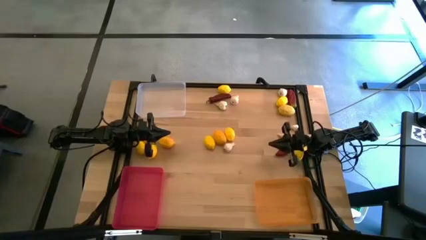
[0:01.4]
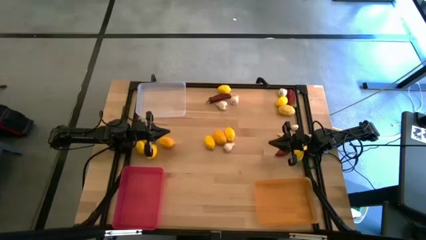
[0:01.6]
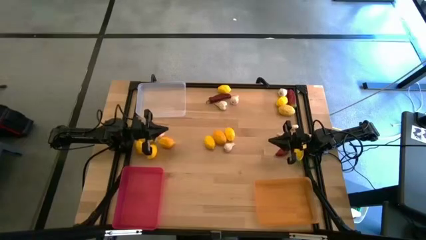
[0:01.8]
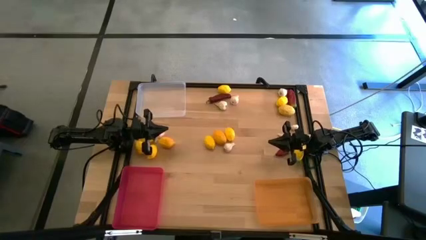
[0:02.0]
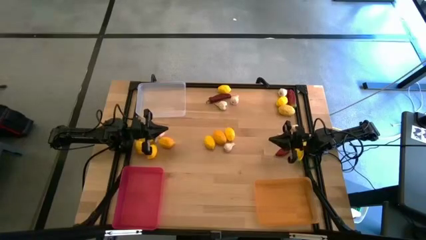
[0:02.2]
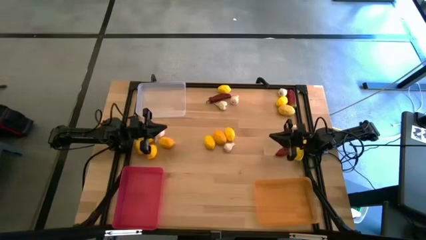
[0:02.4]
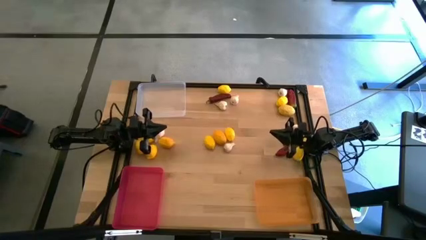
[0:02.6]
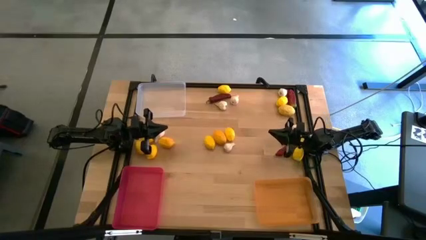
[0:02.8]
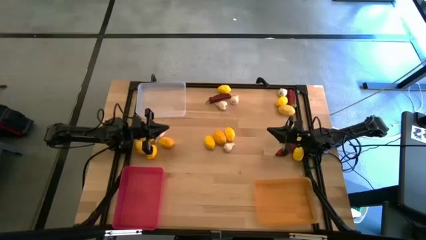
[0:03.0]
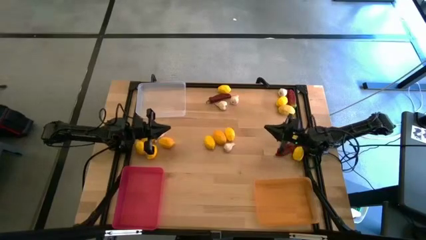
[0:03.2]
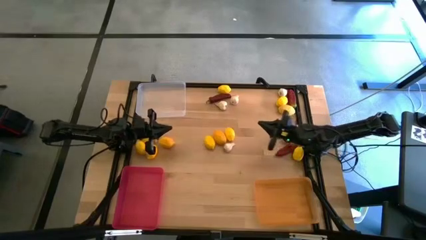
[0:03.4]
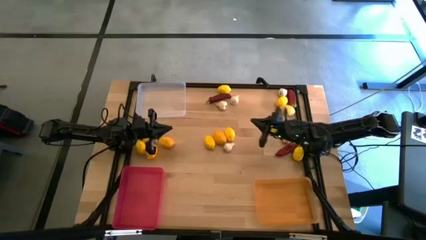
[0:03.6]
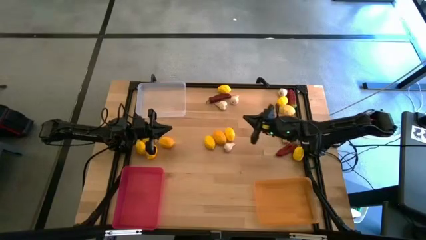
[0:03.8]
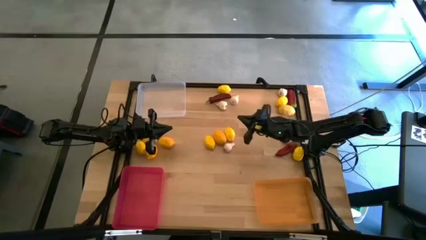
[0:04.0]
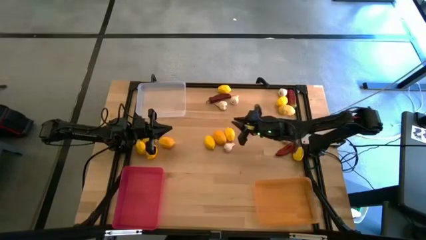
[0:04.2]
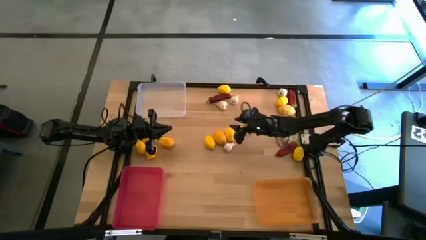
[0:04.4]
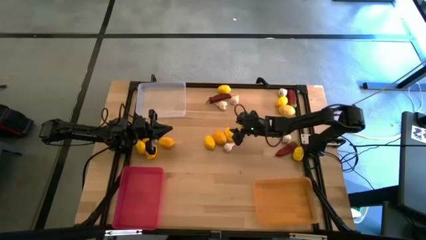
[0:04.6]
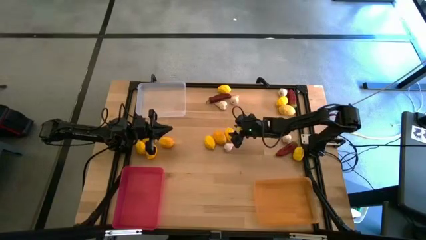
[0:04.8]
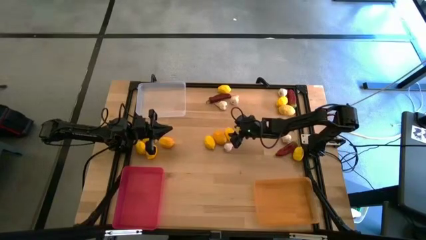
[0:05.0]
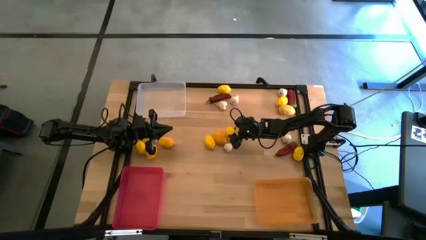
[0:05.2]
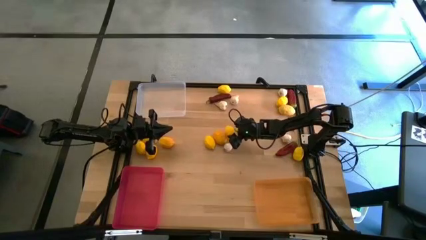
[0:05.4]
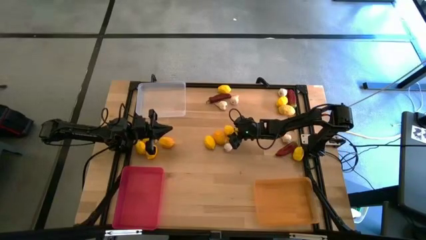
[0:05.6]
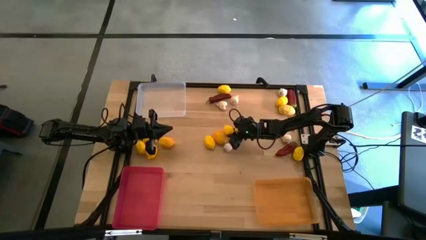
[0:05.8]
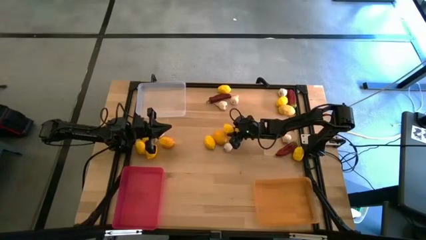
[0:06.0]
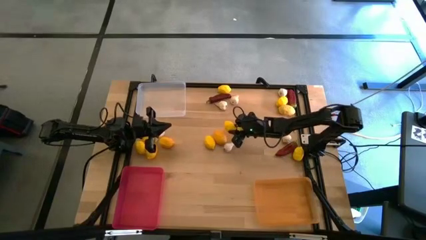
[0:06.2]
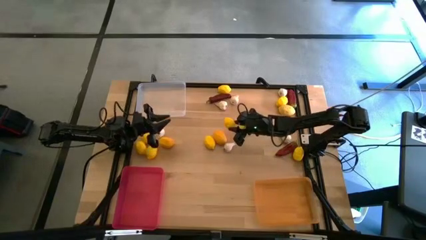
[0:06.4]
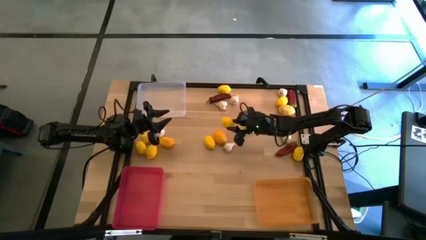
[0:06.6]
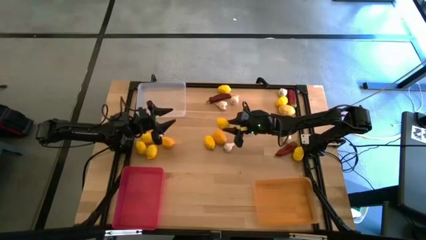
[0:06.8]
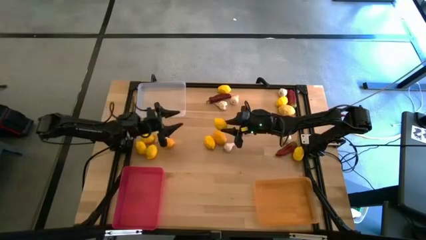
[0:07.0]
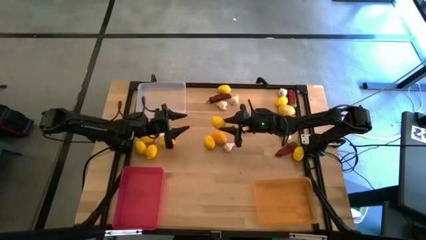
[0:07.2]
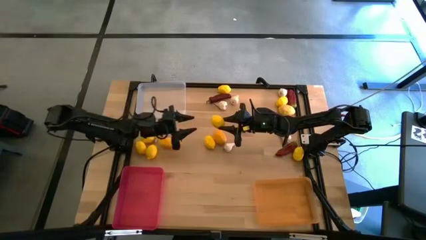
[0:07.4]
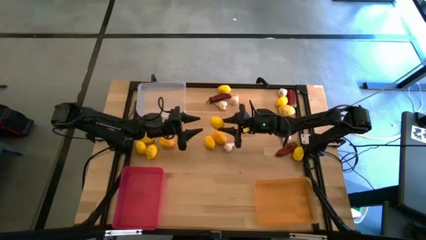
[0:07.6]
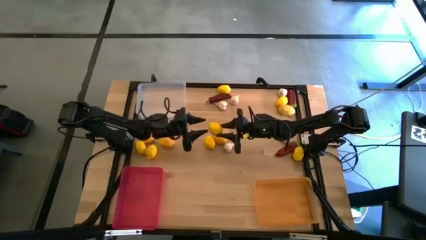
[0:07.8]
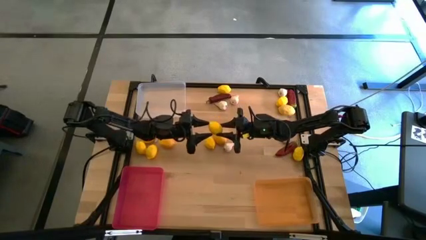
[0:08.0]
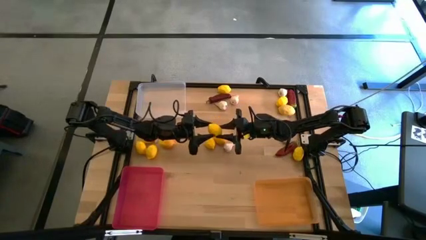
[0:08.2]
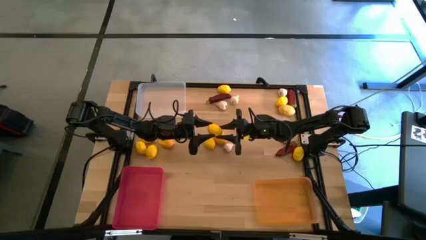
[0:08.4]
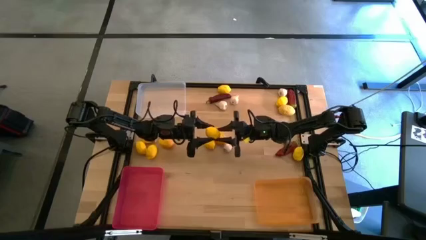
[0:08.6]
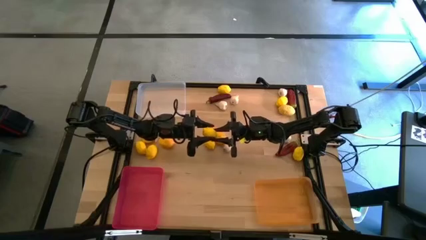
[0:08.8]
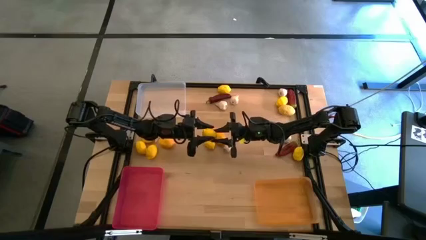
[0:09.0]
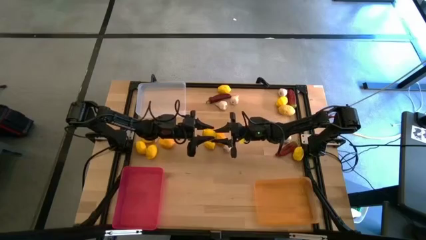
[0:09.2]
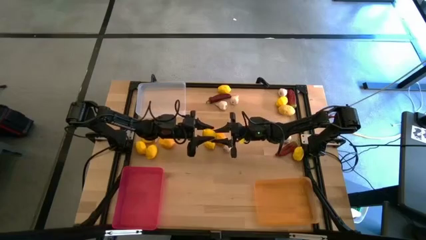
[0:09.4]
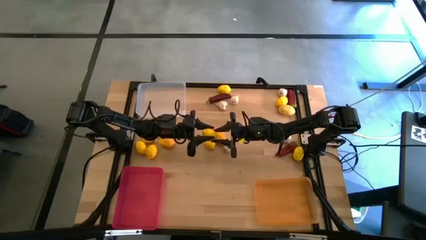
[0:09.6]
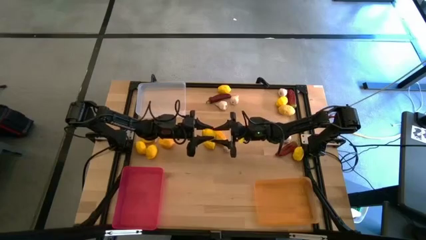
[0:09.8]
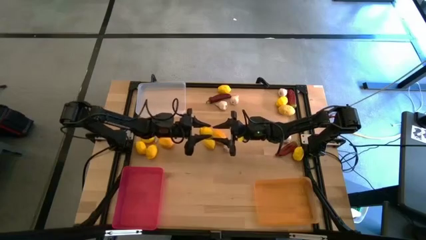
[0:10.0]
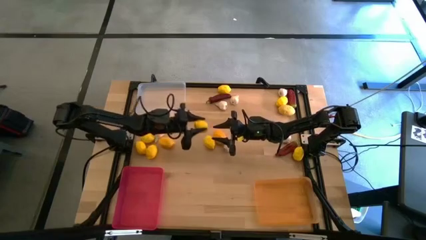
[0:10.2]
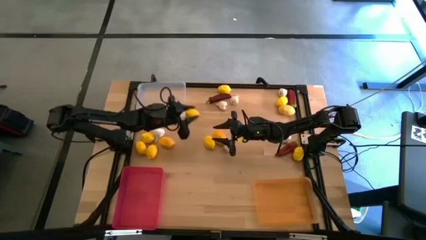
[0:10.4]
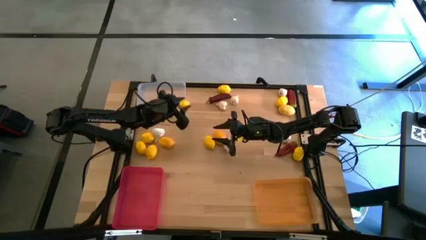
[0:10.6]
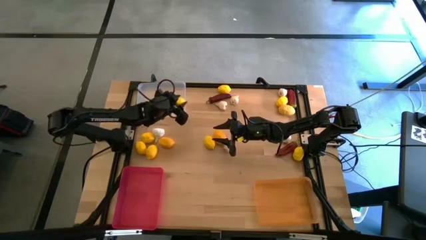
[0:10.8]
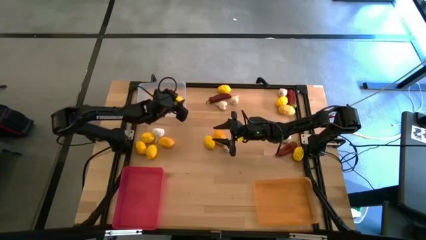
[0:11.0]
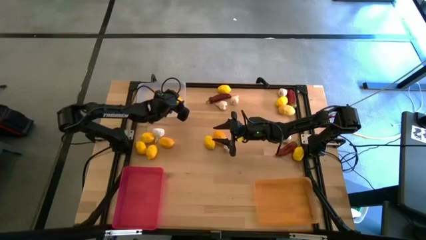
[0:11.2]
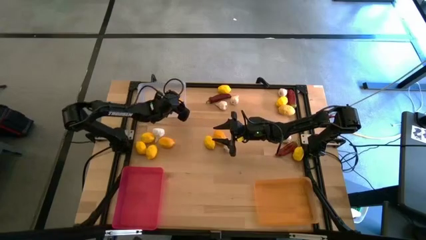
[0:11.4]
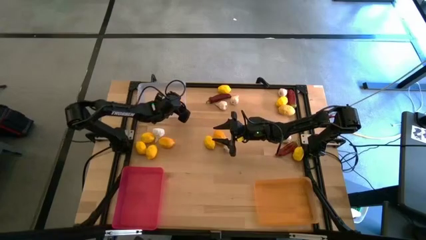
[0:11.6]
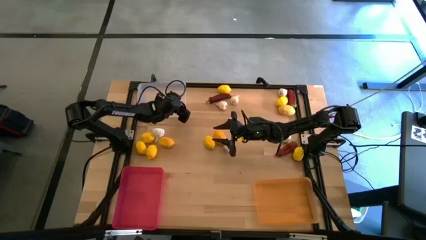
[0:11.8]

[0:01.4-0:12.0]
Task: Sort produce into baskets
Put the yellow lemon into the left white bin

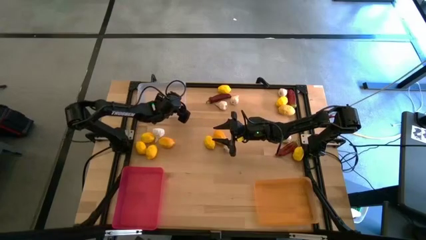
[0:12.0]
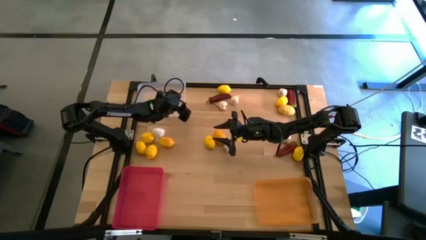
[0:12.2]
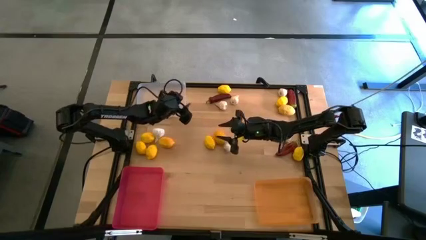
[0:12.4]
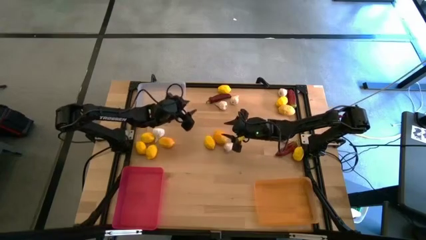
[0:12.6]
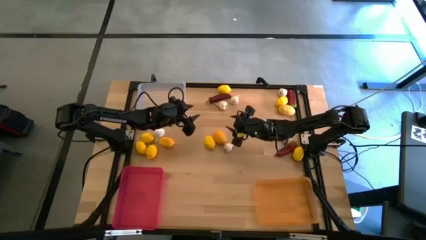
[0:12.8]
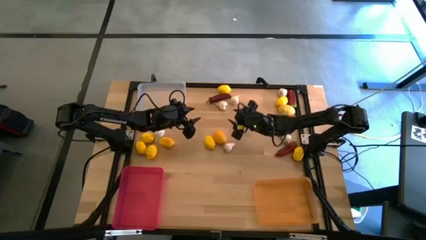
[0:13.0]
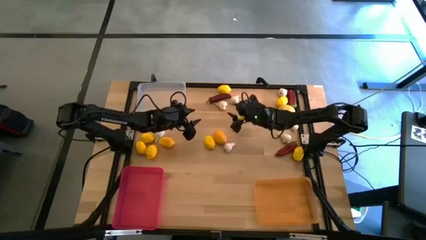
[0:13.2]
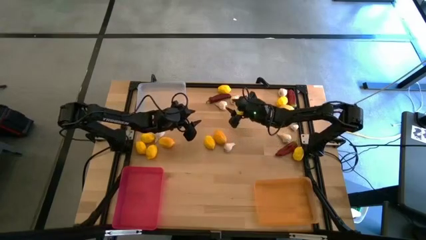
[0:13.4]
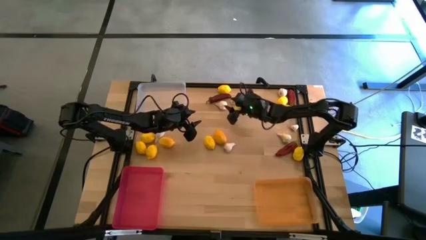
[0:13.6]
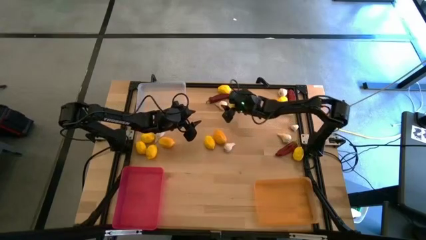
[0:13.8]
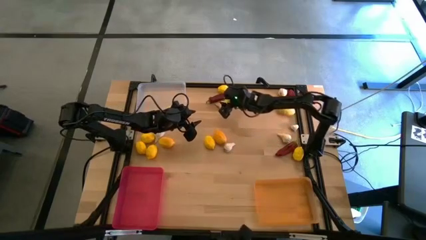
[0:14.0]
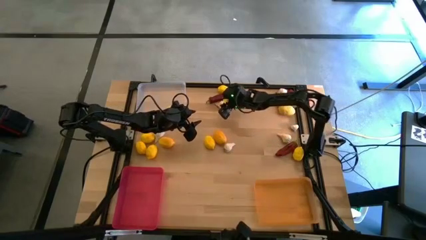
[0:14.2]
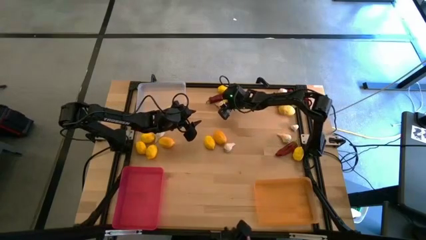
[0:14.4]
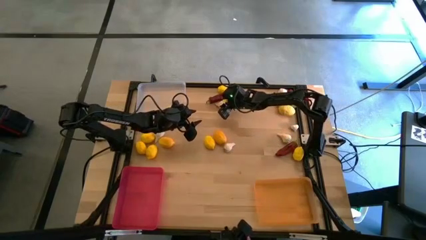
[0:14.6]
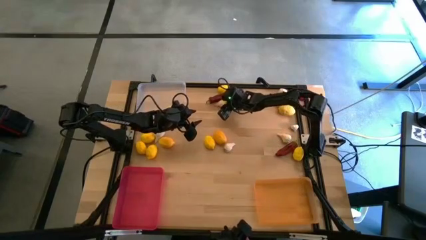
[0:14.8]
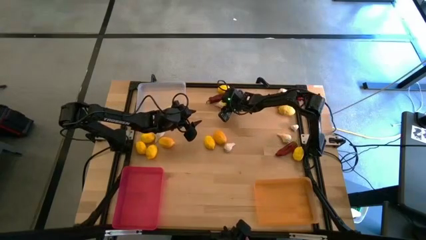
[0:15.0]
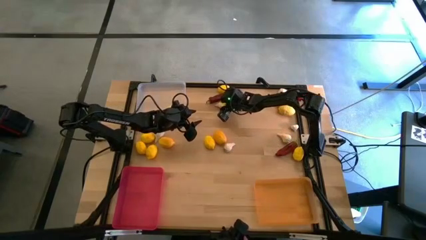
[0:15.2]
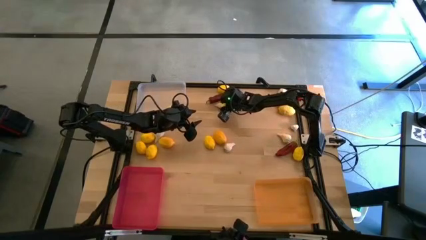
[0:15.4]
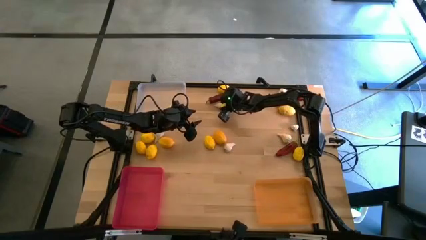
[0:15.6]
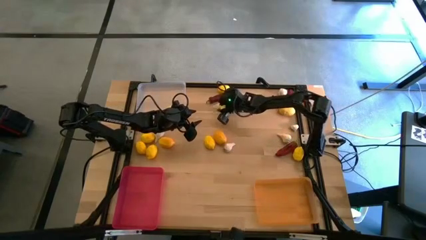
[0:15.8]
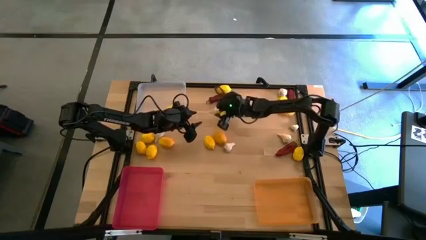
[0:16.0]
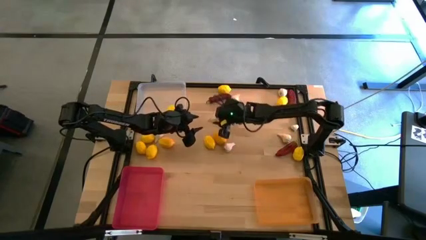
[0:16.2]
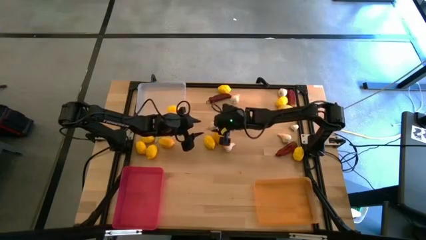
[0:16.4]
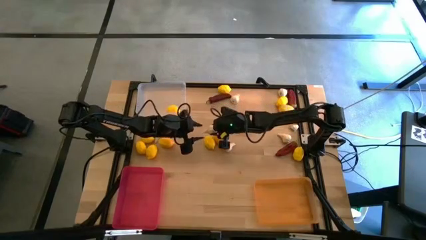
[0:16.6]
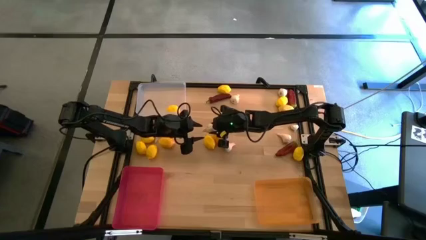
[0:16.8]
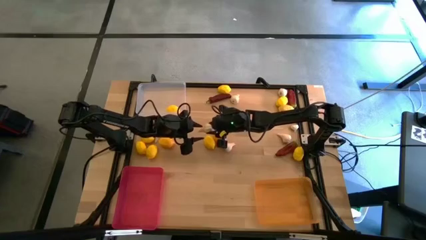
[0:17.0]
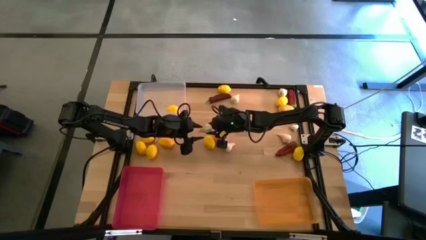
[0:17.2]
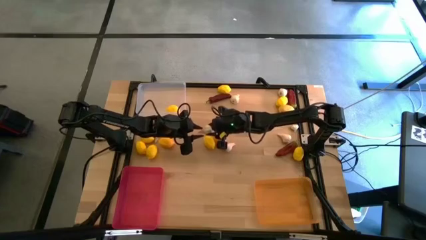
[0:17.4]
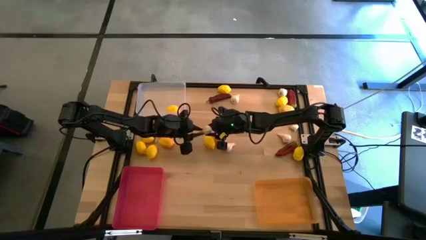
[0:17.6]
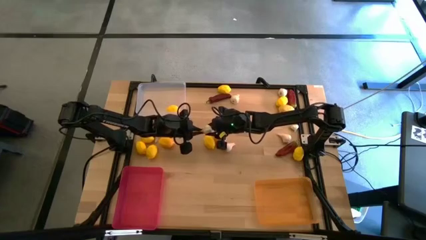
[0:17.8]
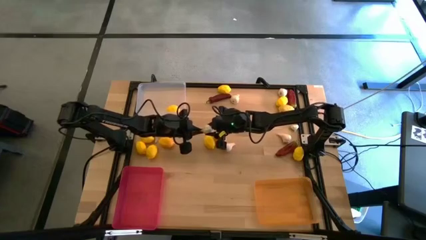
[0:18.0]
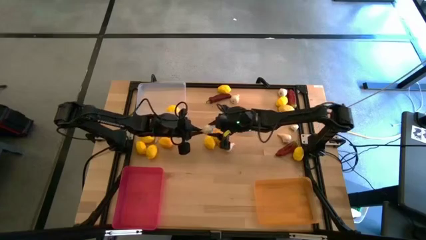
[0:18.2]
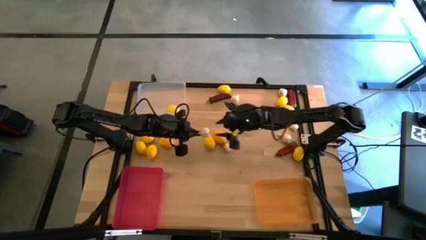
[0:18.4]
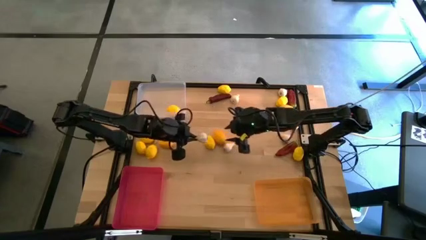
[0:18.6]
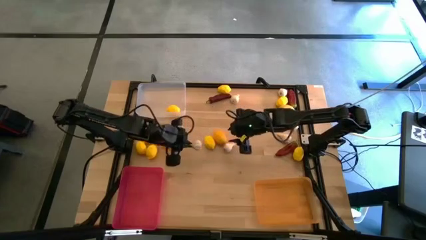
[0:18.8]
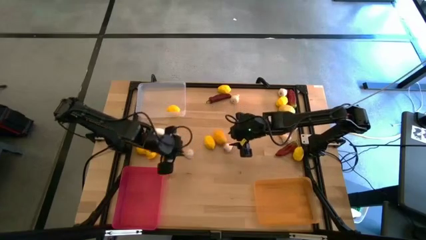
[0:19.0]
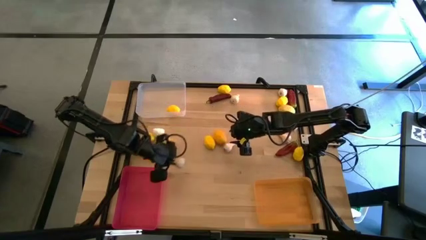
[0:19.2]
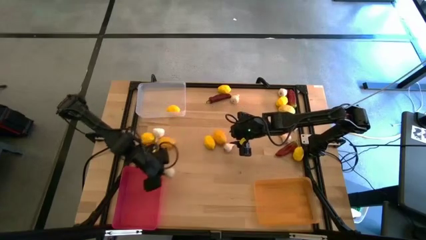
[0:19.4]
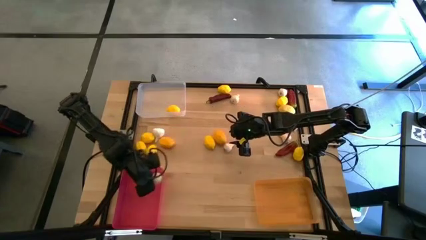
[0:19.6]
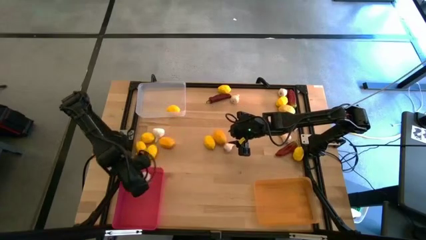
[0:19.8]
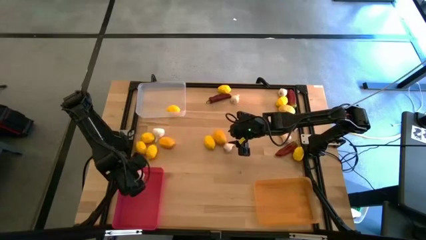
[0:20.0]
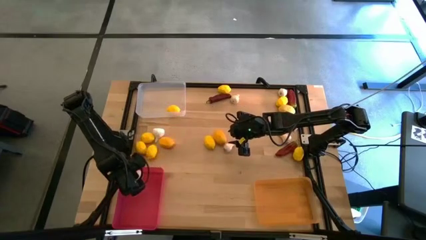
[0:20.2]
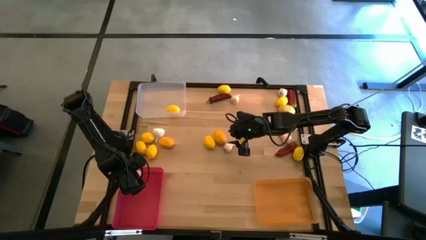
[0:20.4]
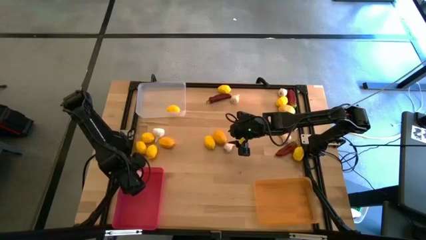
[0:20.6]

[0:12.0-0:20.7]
Put the white garlic into the bottom left red bin
